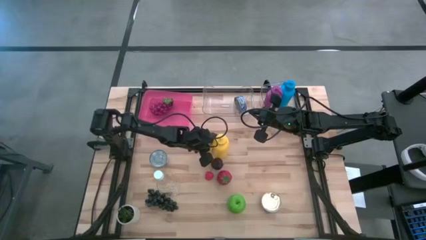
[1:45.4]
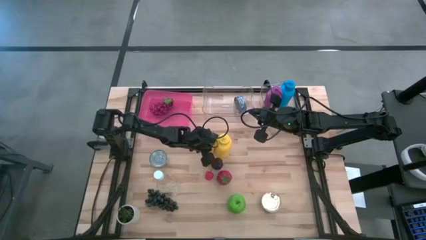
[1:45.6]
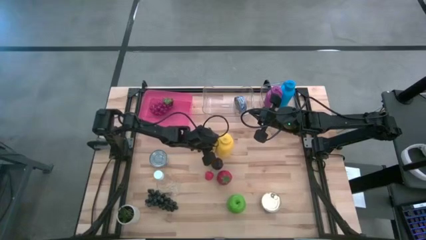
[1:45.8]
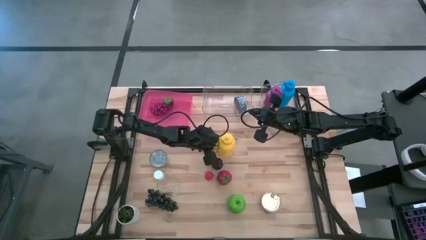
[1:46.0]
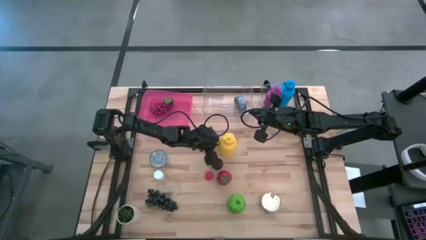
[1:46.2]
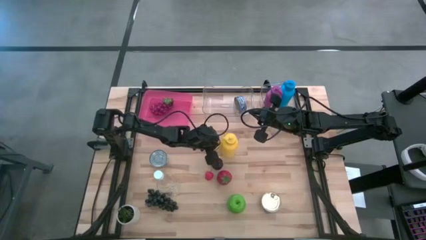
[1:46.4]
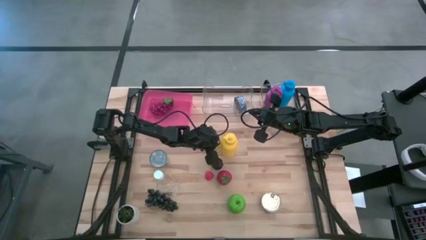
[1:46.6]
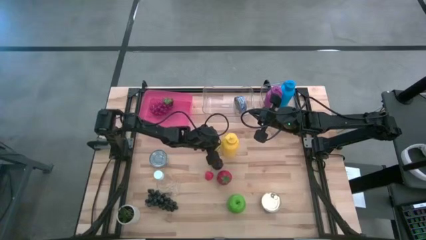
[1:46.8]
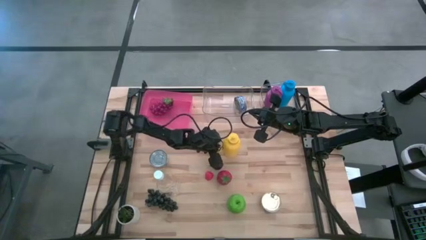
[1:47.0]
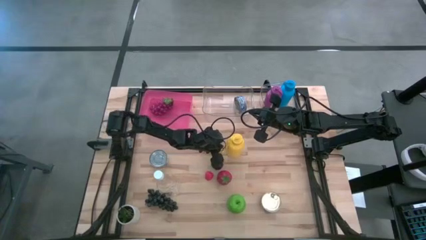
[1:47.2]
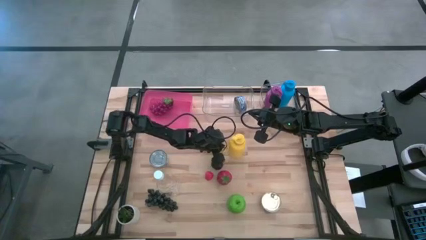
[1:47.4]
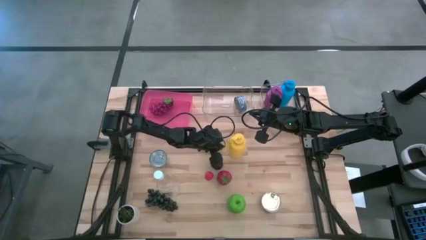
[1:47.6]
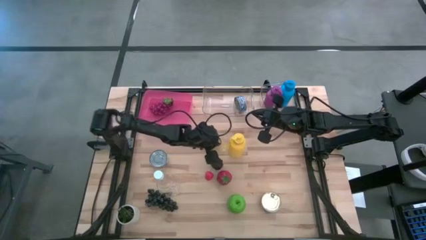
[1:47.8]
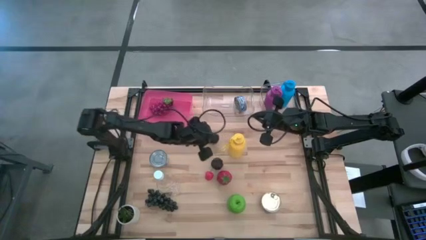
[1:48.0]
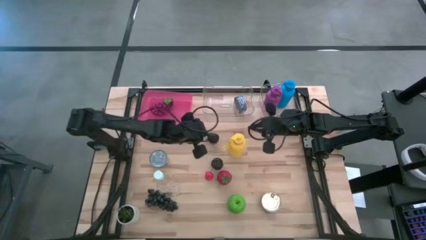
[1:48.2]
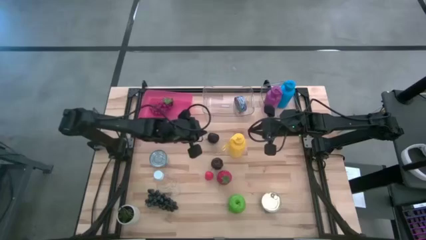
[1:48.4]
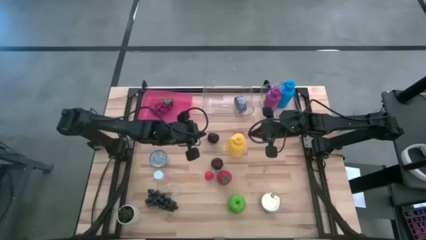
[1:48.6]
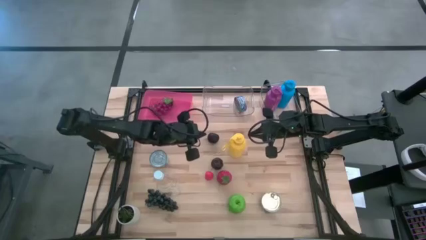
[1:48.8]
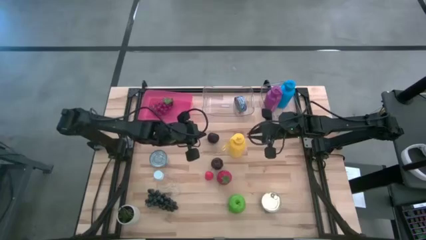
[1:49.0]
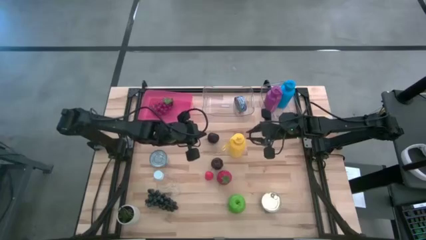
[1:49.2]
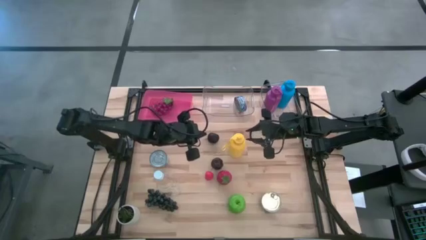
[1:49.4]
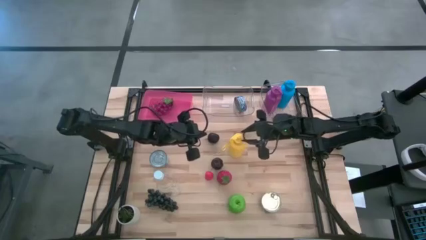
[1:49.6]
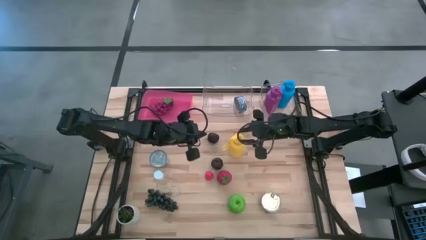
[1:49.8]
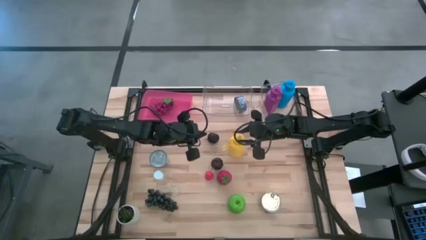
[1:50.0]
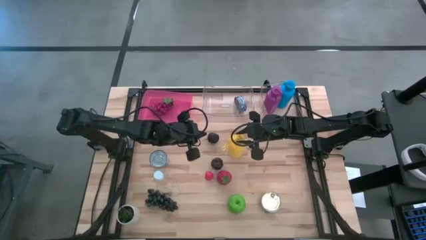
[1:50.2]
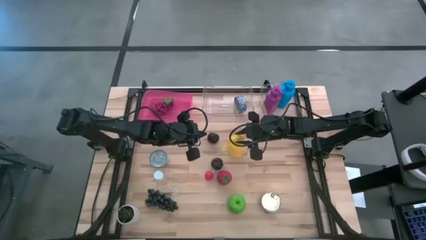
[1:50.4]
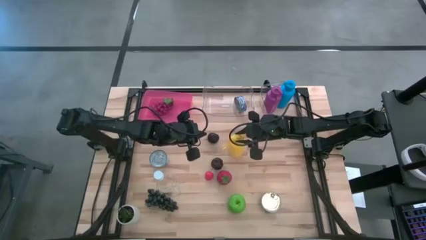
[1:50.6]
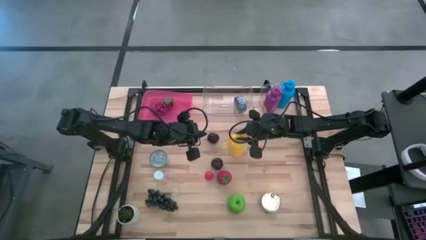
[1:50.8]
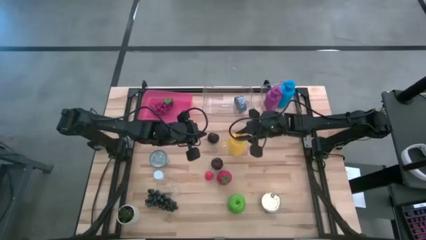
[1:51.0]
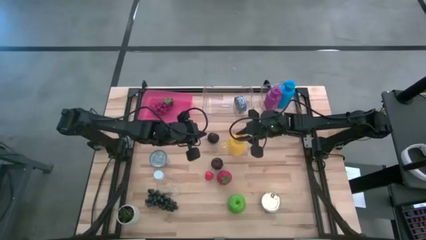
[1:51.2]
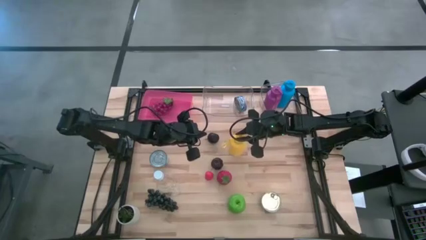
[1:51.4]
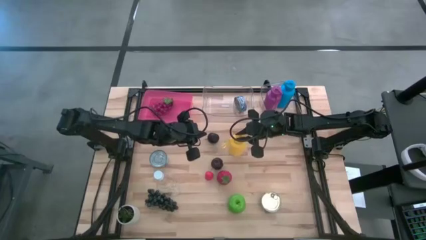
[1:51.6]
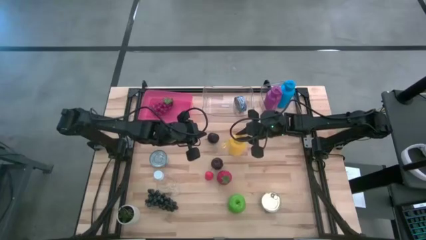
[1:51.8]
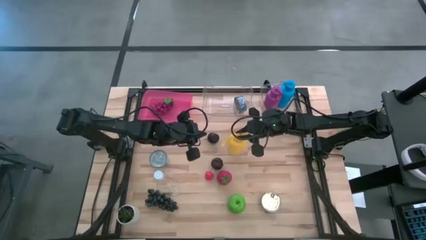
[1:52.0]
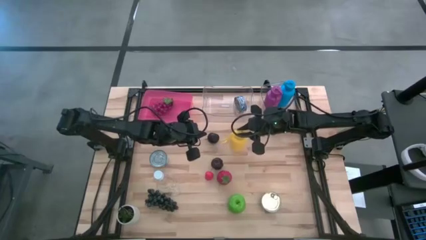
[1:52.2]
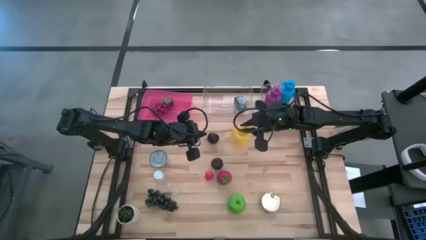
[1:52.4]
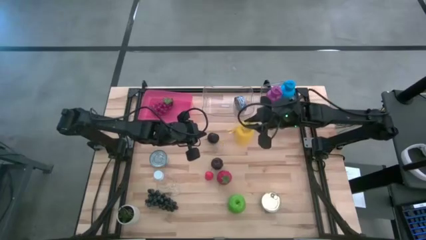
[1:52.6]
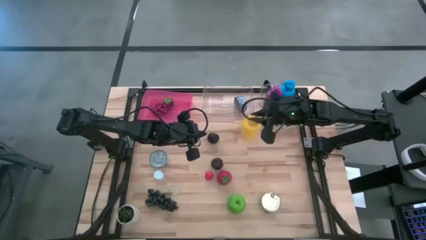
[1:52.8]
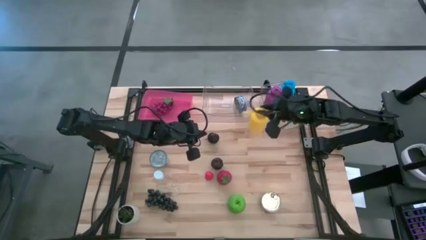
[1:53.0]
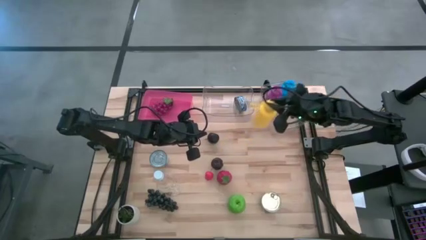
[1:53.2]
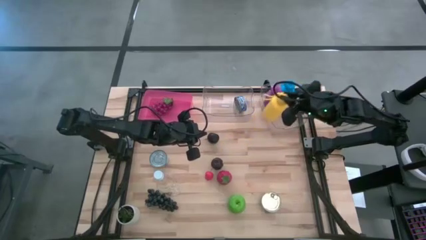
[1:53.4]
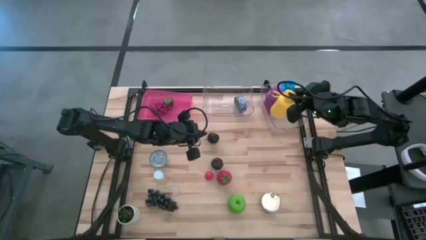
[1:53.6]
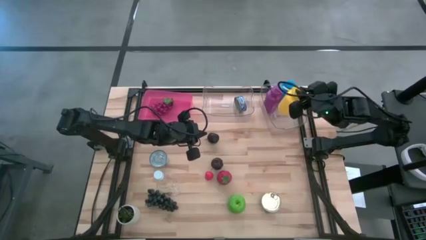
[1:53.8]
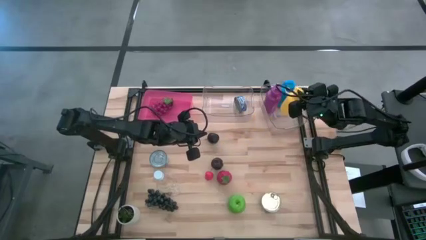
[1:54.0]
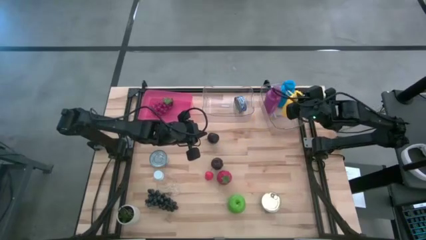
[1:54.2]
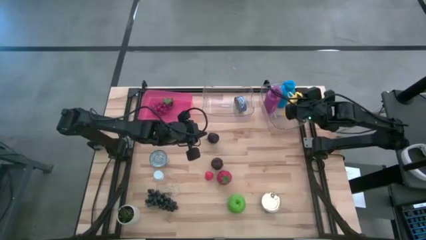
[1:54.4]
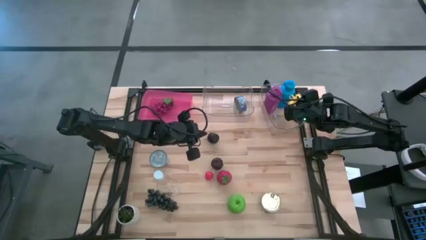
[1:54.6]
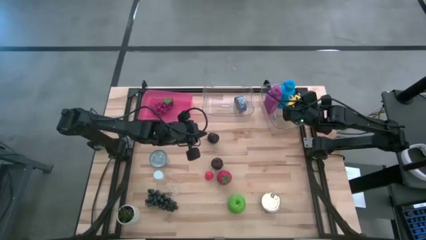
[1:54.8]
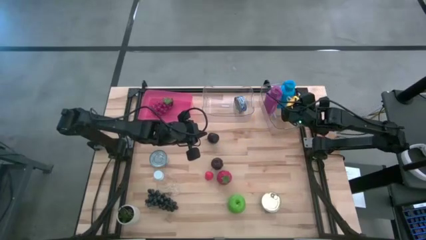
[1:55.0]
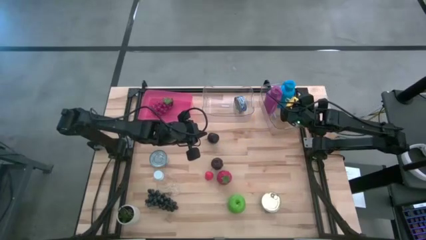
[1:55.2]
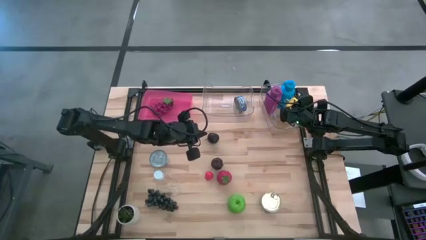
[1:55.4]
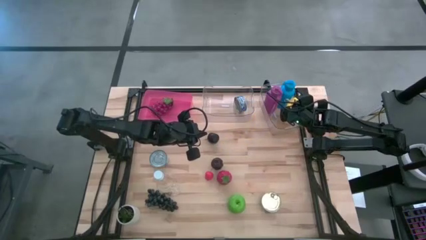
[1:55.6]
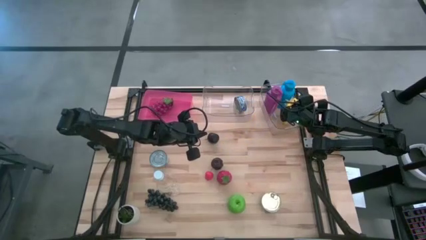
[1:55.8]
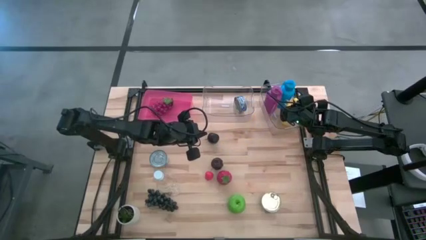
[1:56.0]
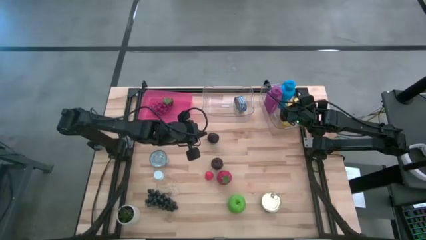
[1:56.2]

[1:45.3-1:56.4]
Task: Pick & Place Food Item
Put the yellow water bottle into the right transparent bin

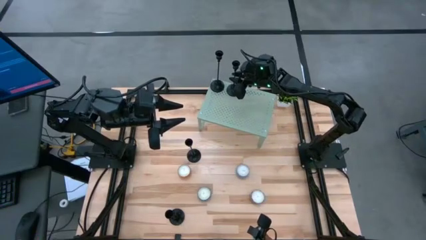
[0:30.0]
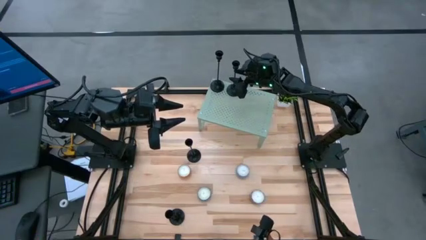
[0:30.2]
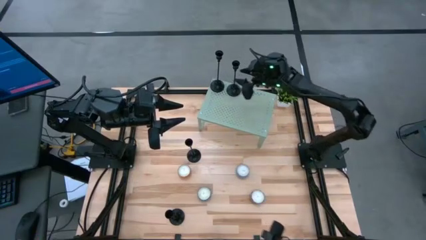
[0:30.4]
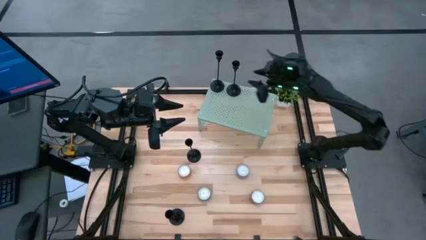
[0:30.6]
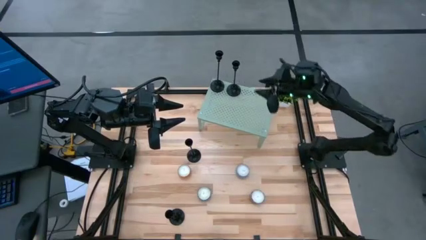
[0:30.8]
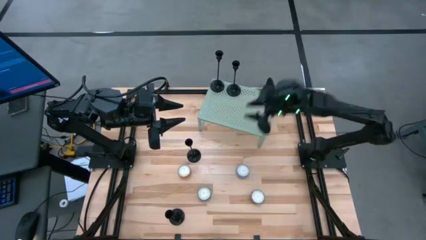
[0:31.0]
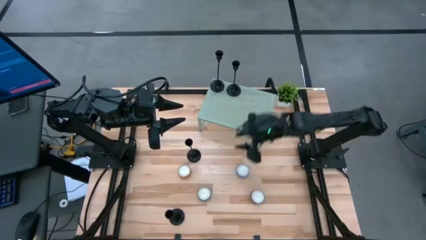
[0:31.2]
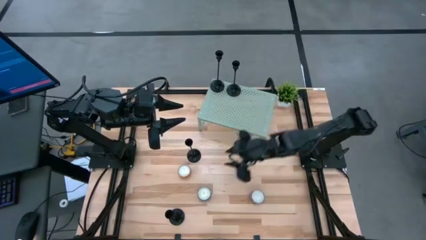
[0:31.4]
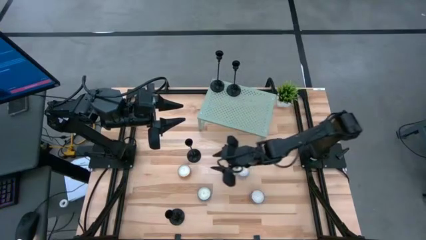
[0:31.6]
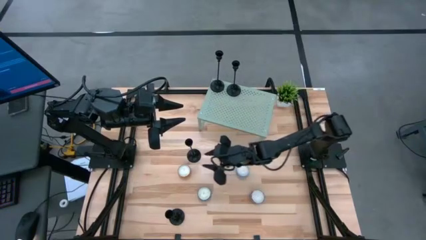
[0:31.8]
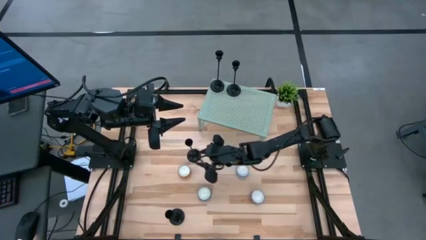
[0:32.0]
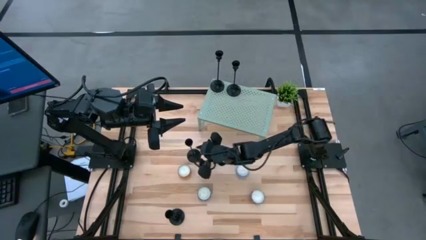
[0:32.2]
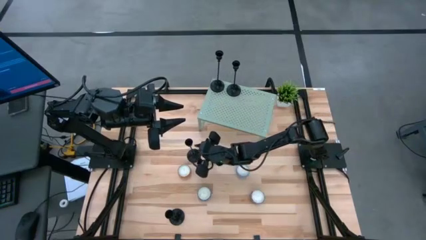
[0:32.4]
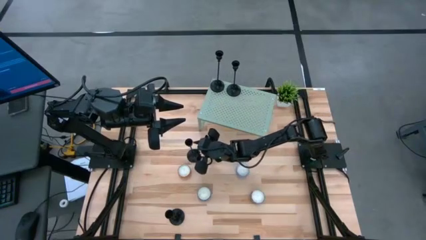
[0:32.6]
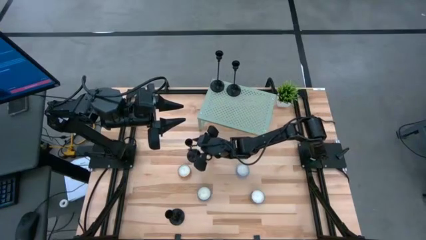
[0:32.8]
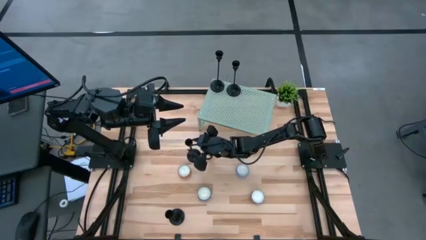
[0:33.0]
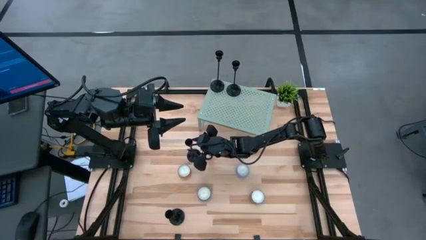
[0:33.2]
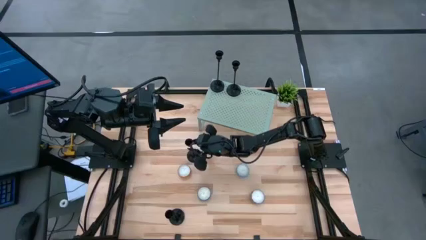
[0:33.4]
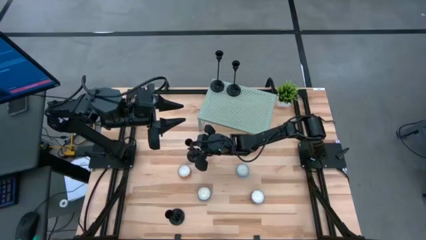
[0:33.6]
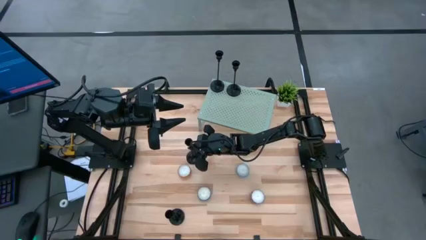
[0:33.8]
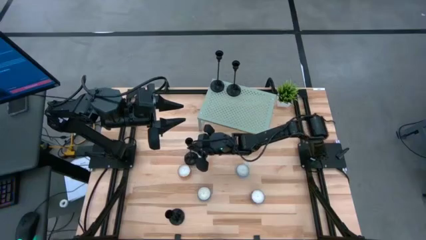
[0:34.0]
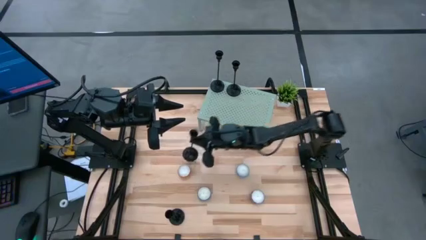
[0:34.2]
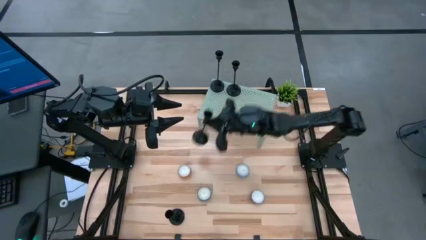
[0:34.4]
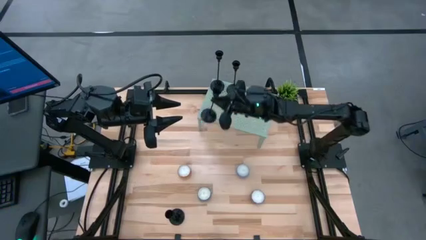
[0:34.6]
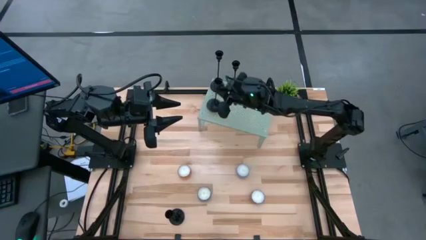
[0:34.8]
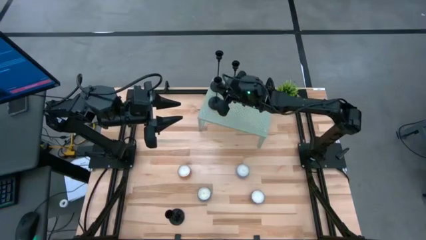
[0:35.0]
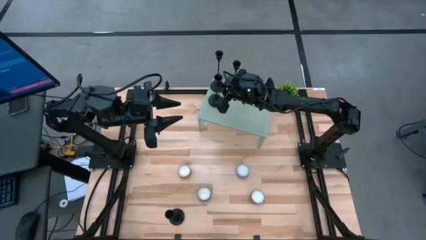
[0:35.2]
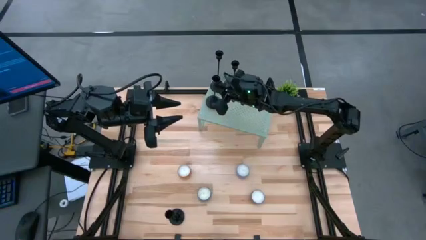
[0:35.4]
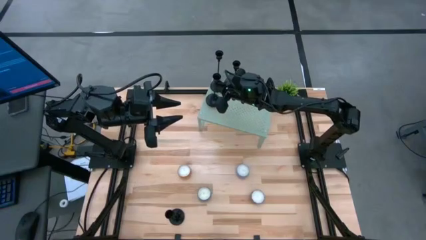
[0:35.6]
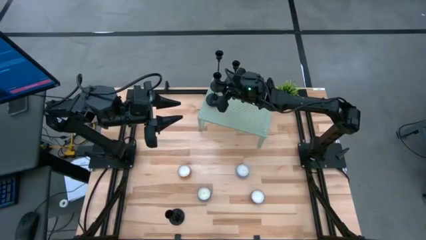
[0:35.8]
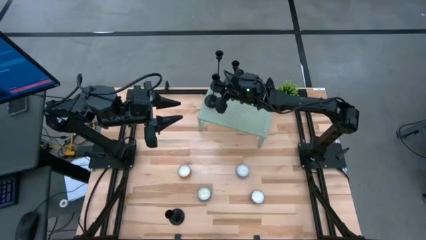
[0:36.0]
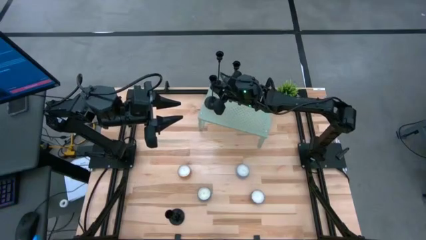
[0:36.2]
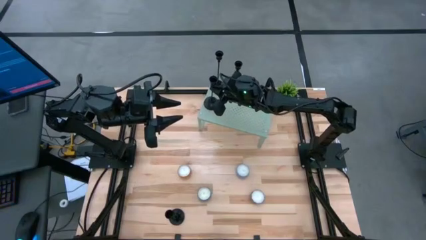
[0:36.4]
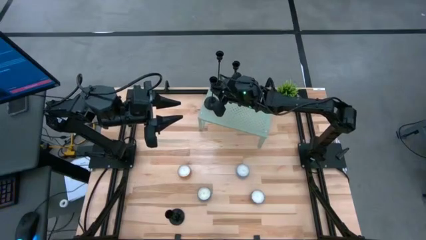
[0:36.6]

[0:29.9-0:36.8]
Task: Pick & Place candle stick holders
Put the black candle holder on the shelf
